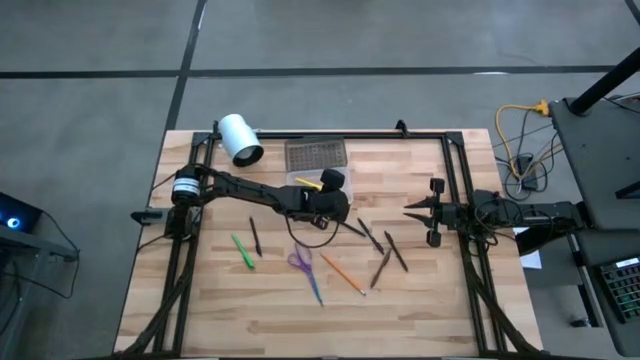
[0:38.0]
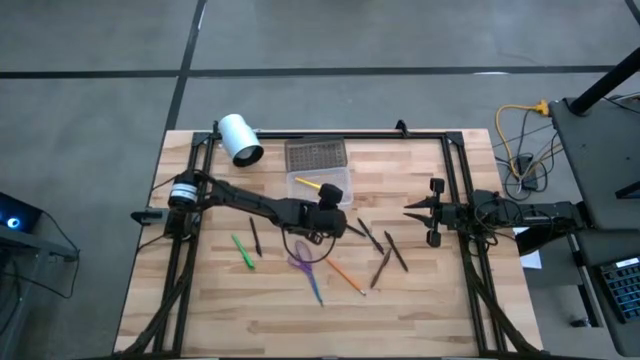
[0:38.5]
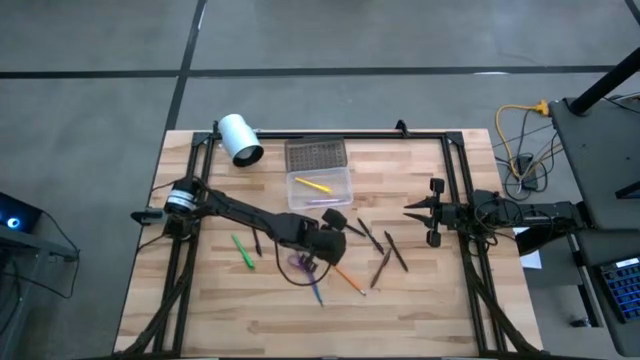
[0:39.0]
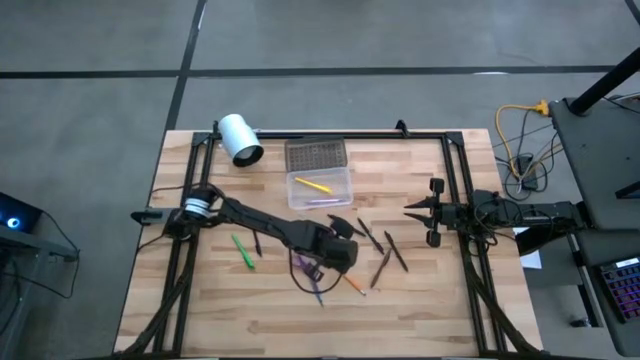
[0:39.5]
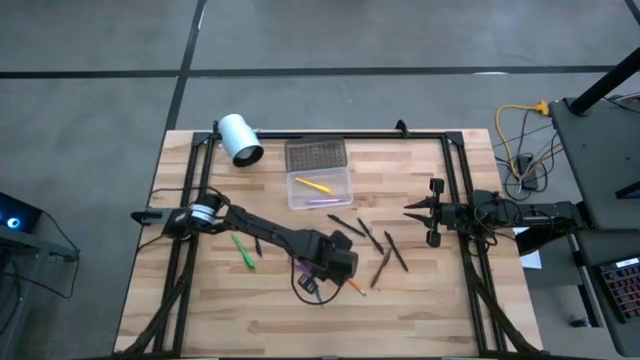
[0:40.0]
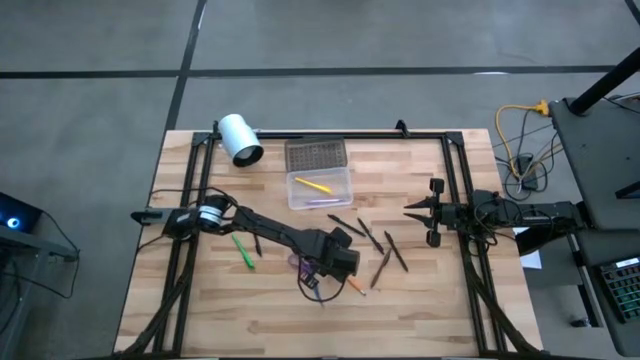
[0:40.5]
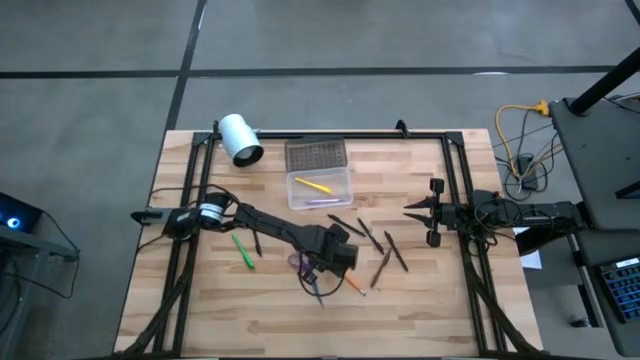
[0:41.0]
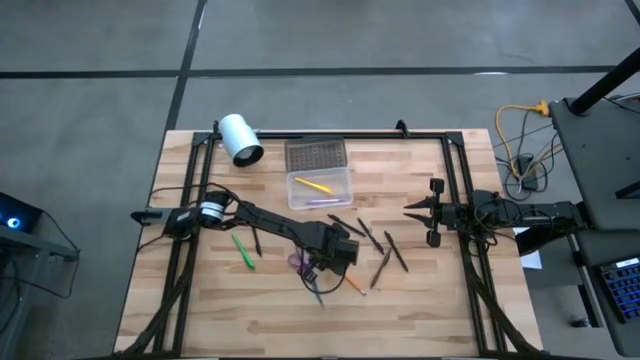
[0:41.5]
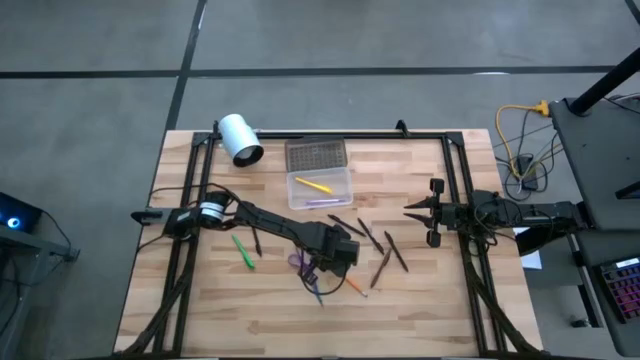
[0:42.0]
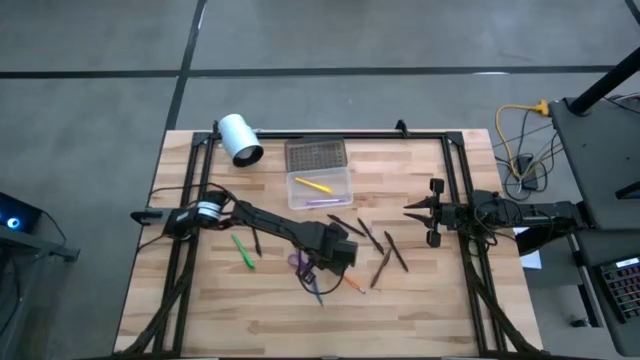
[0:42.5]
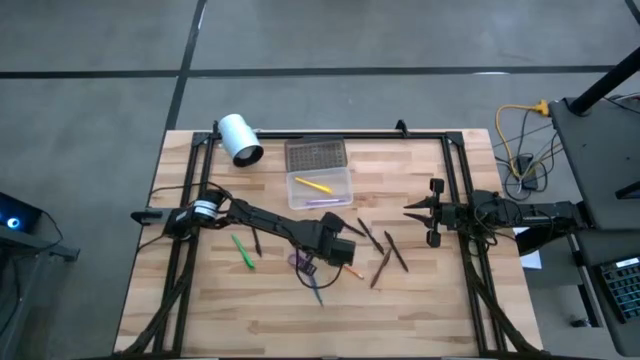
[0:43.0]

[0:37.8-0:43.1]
Task: Pick & place school supplies into a supply box
Put the violet scissors into the supply box

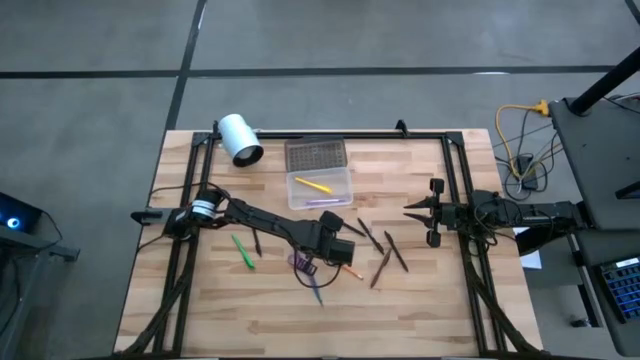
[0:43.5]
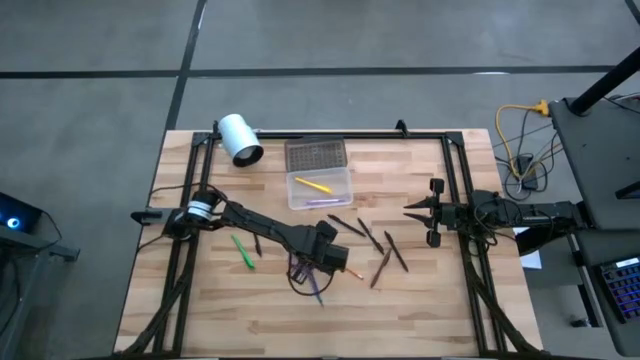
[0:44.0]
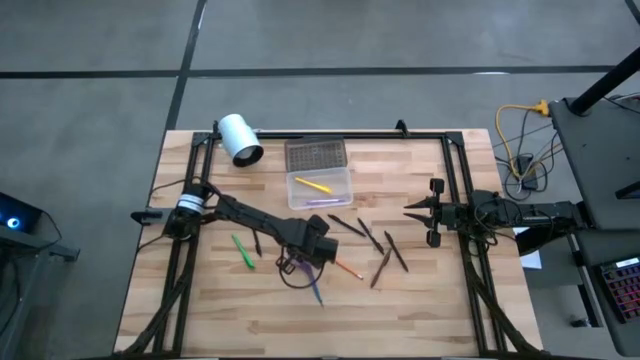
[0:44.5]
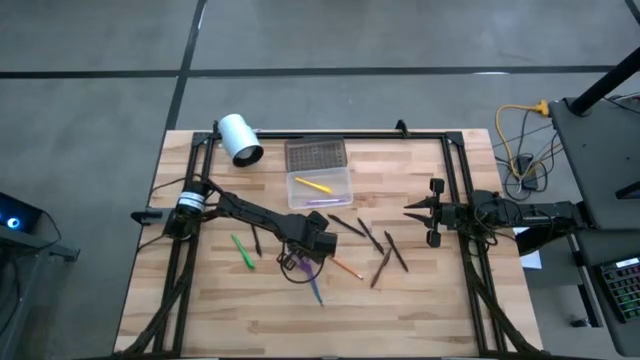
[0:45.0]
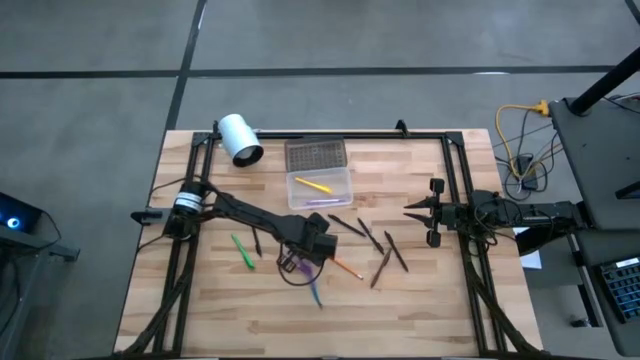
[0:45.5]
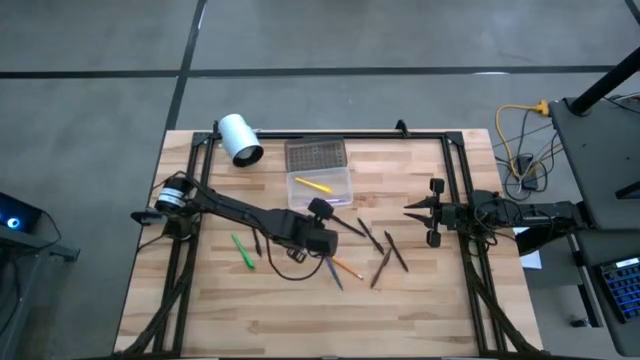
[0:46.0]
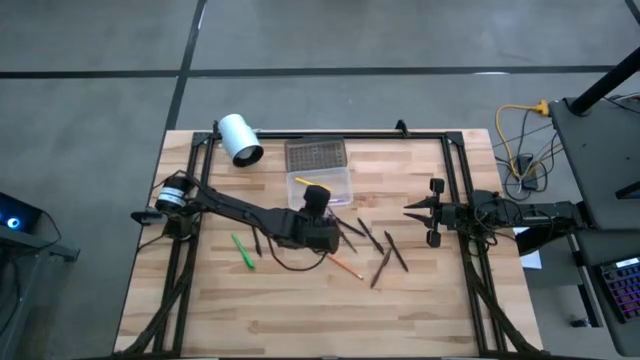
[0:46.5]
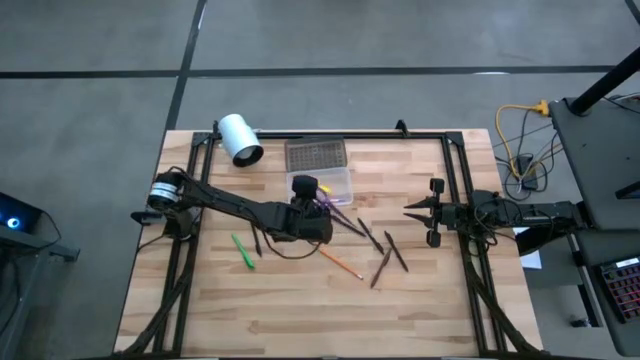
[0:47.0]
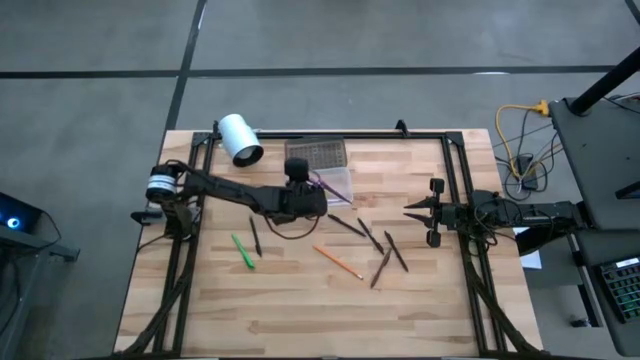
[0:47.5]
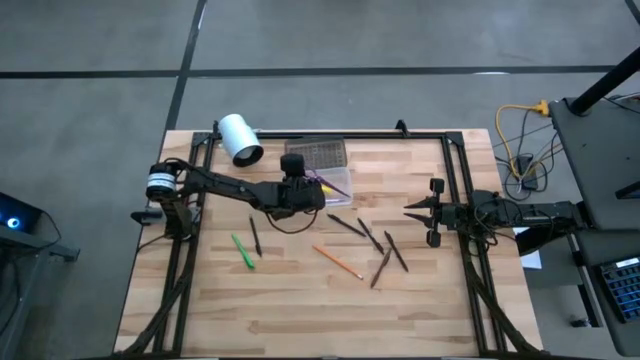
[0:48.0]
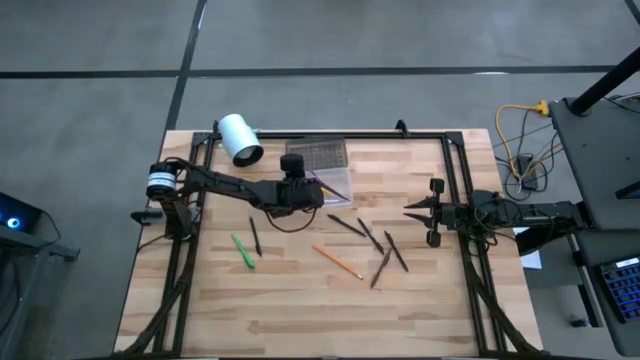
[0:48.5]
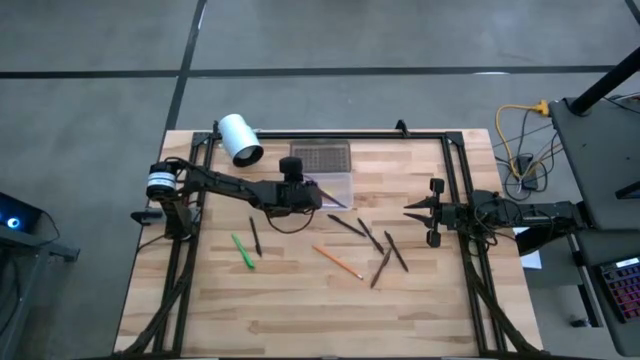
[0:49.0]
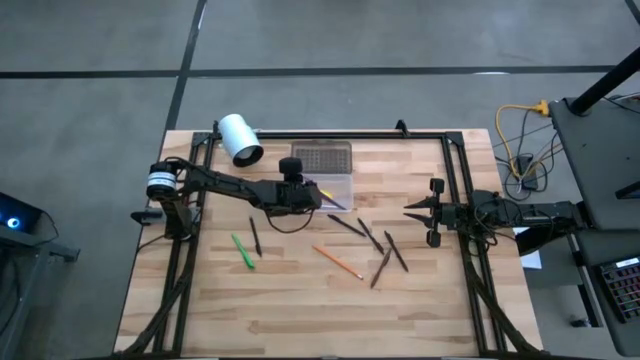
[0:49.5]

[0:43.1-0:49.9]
Put the violet scissors into the supply box

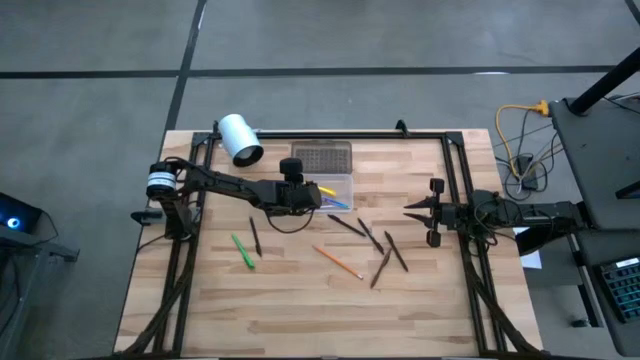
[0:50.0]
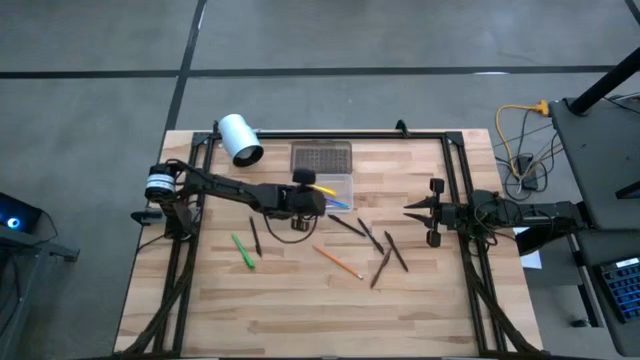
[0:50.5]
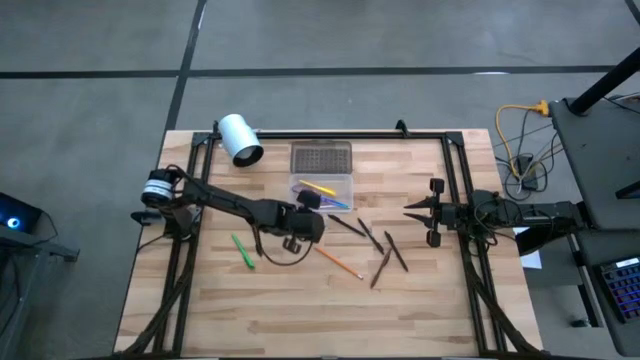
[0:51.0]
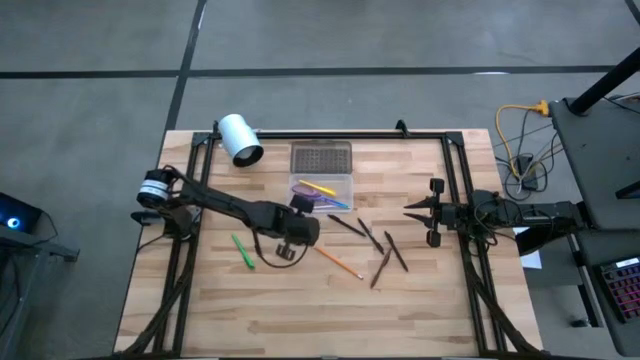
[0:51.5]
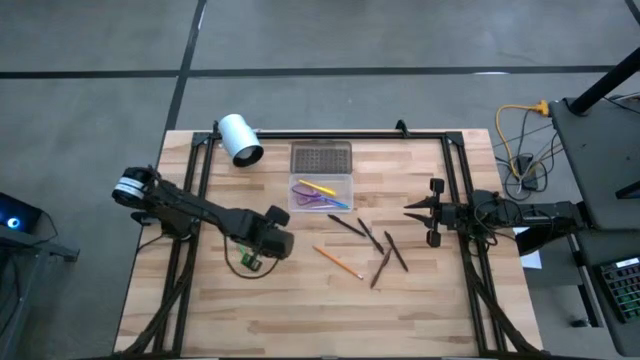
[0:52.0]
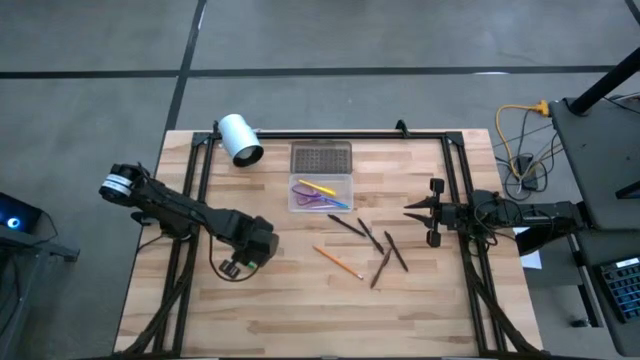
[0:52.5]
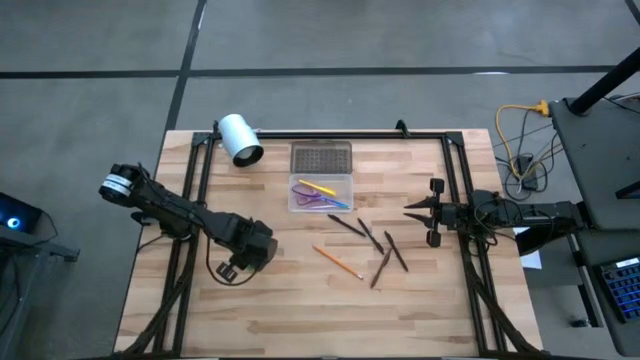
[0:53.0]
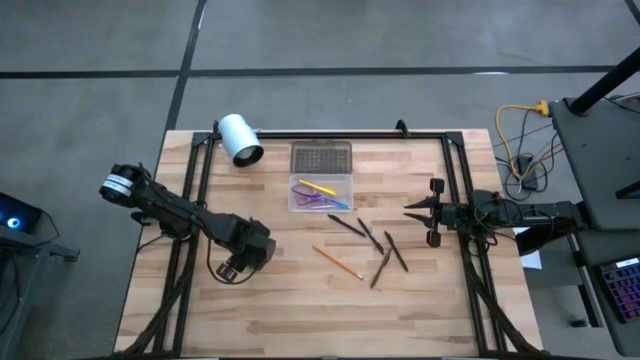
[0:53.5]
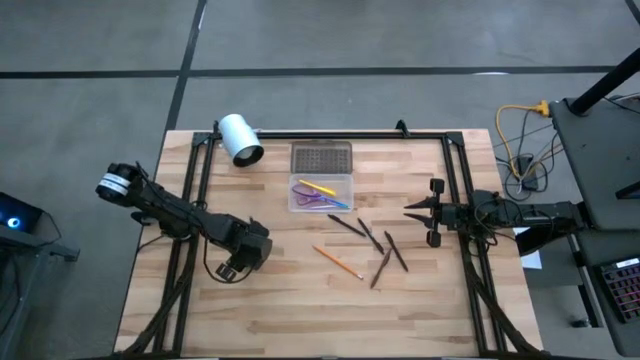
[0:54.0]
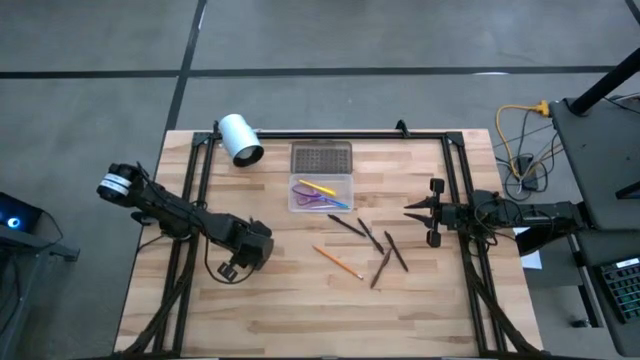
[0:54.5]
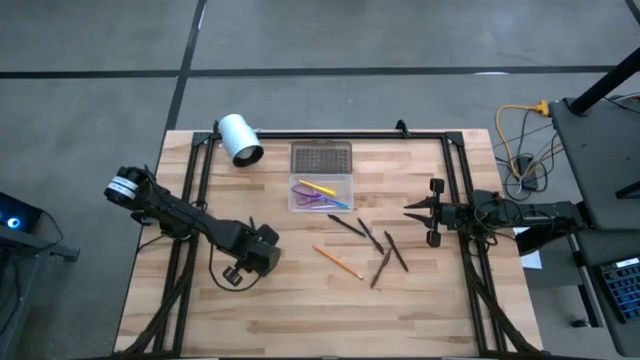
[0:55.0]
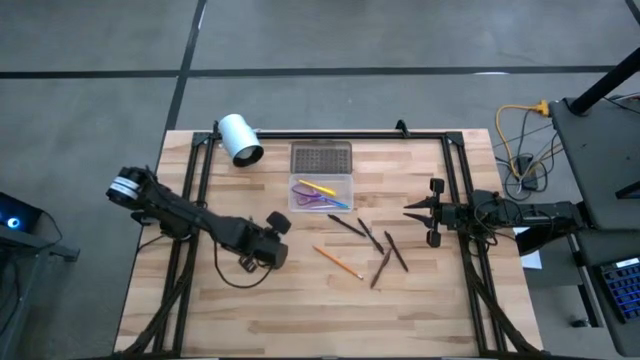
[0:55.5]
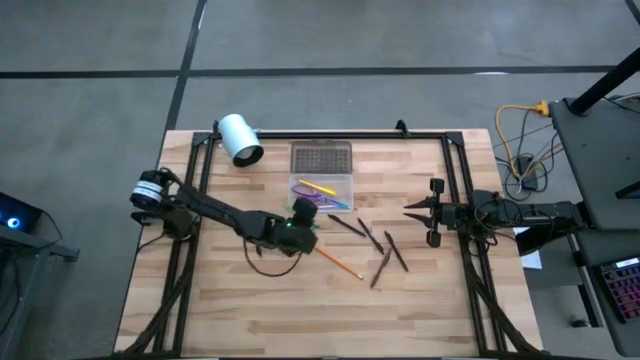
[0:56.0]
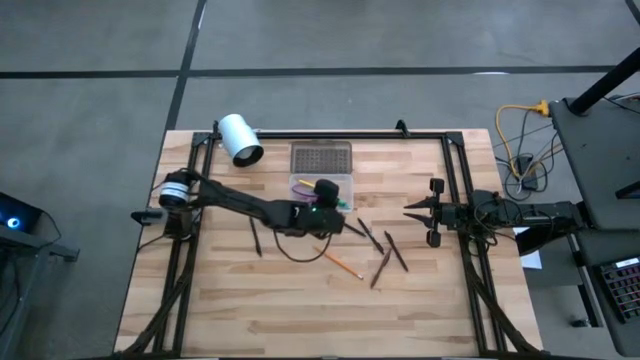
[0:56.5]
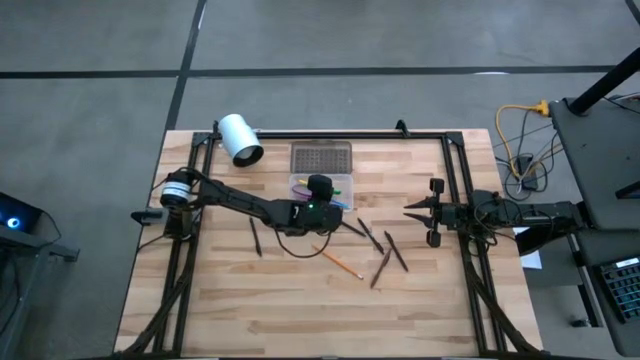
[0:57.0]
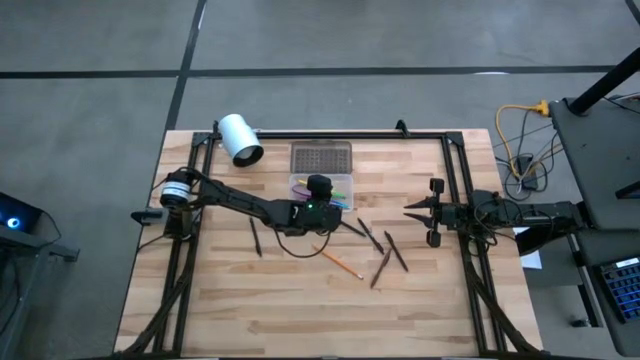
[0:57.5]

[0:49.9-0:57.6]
Put the green pen into the supply box

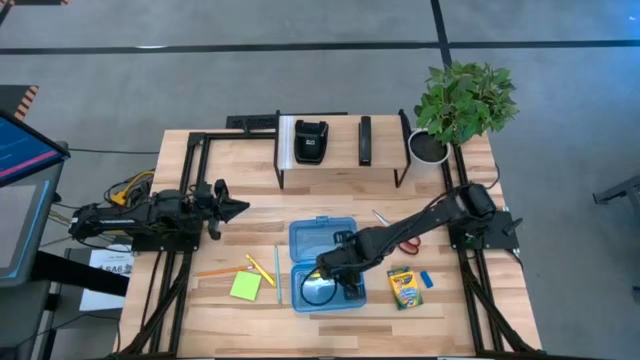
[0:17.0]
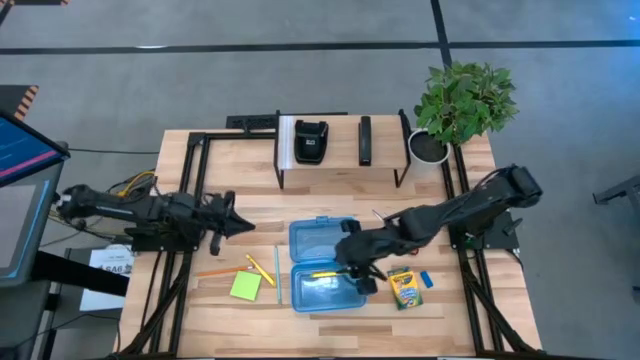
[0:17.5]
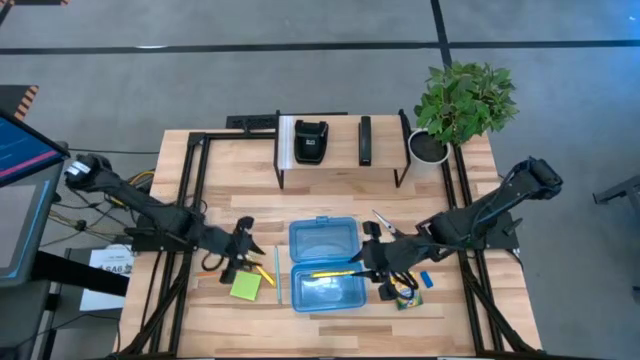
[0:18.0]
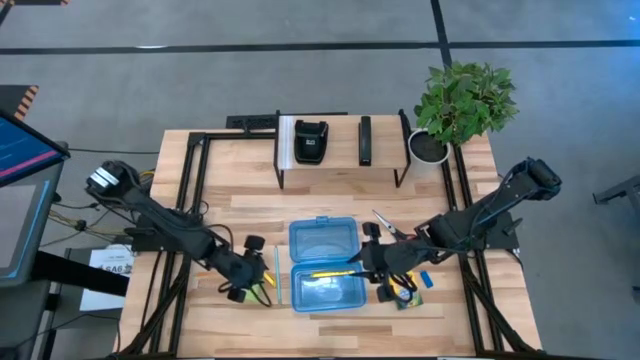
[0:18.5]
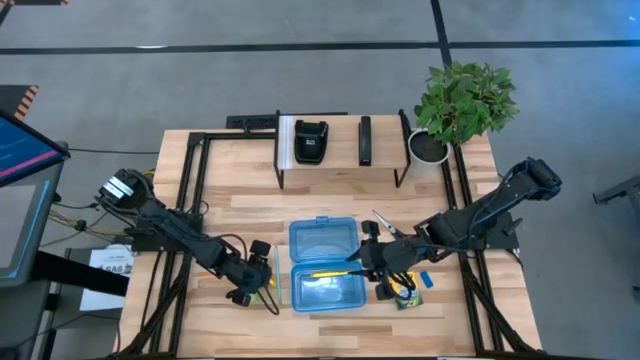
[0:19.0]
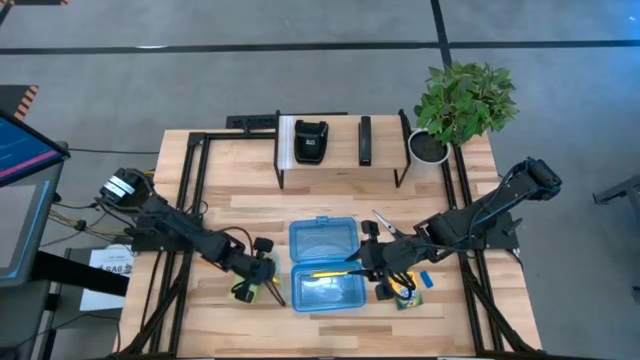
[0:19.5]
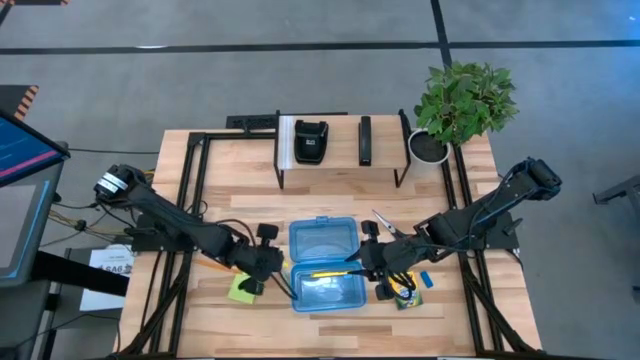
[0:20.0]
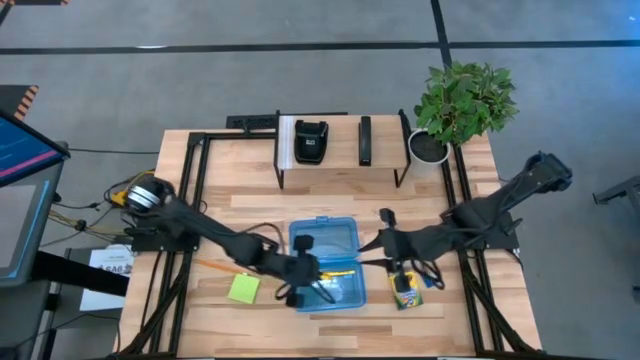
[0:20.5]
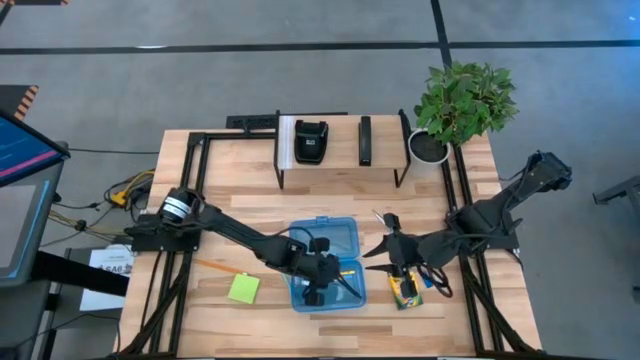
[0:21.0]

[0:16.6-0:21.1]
Task: Pack school essentials
Put the yellow pen into the blue supply box
